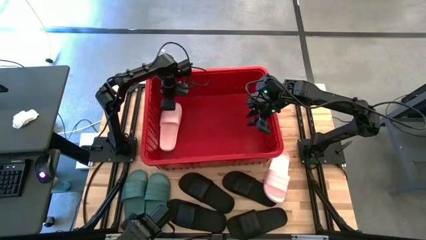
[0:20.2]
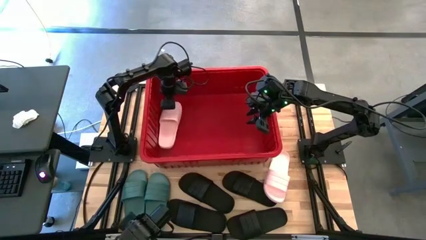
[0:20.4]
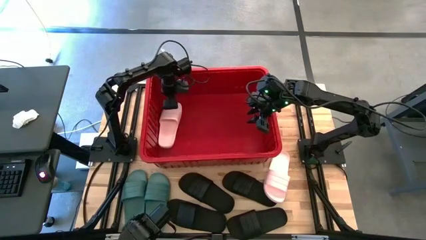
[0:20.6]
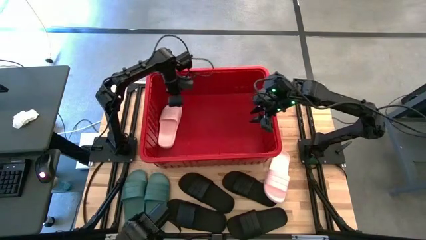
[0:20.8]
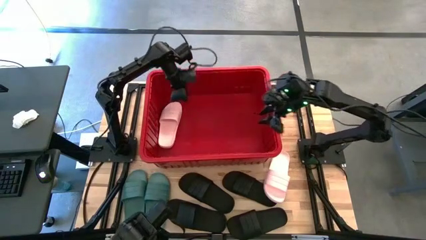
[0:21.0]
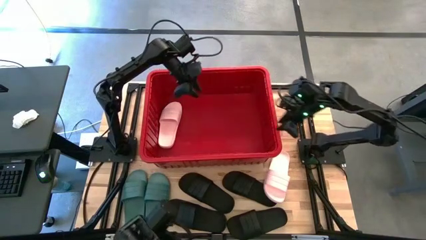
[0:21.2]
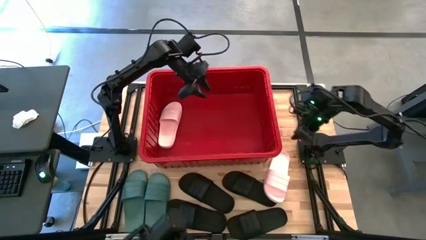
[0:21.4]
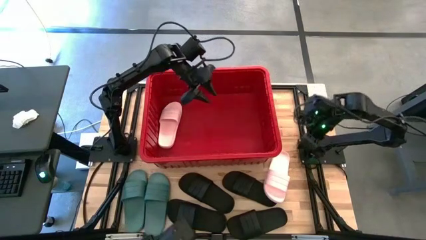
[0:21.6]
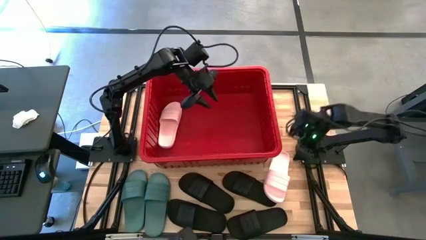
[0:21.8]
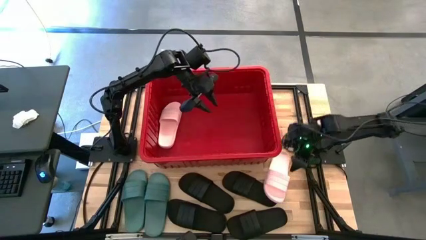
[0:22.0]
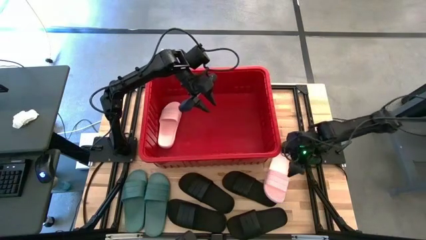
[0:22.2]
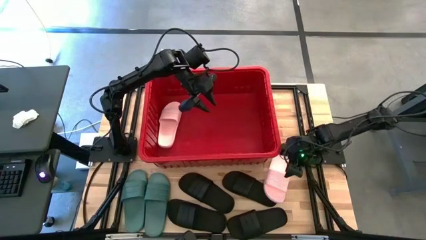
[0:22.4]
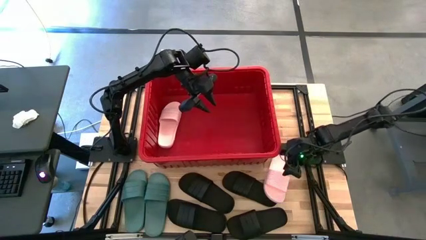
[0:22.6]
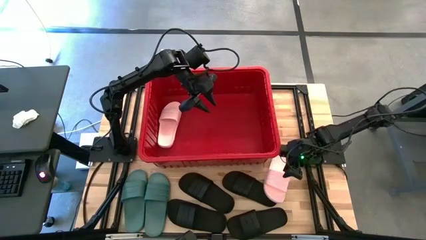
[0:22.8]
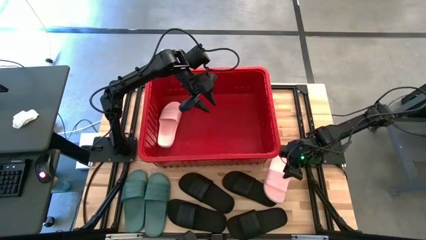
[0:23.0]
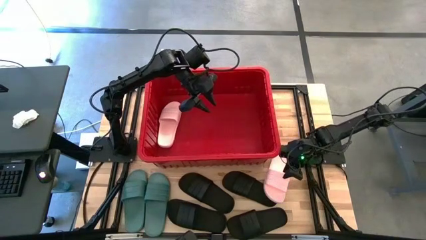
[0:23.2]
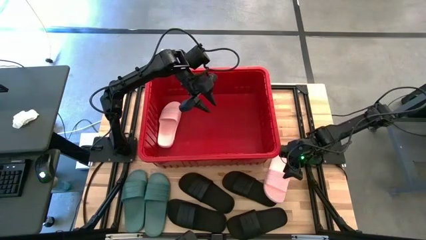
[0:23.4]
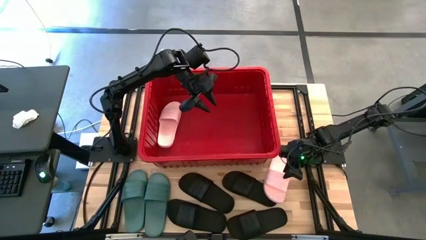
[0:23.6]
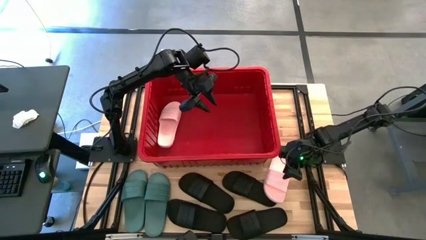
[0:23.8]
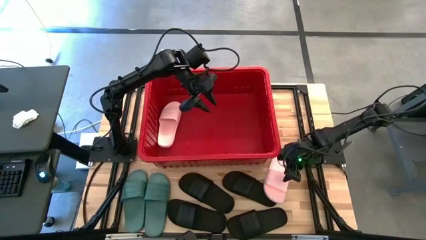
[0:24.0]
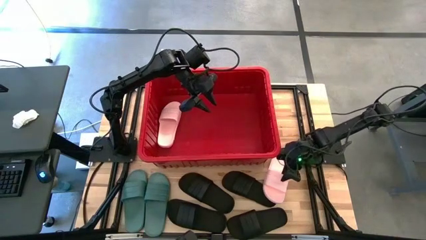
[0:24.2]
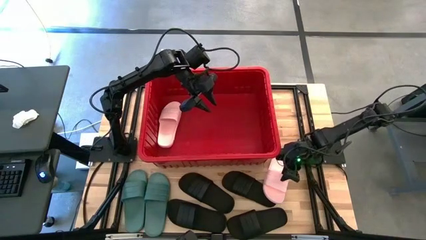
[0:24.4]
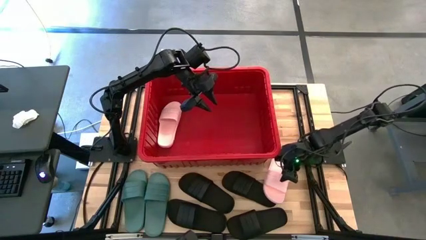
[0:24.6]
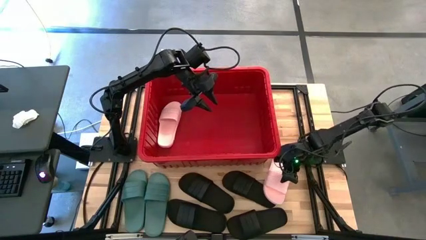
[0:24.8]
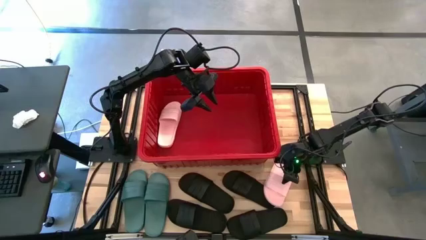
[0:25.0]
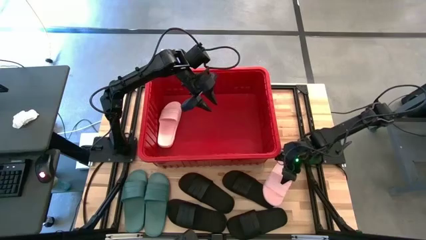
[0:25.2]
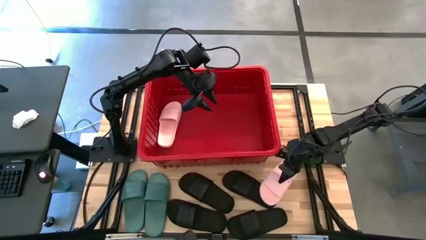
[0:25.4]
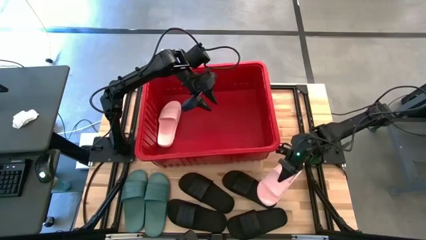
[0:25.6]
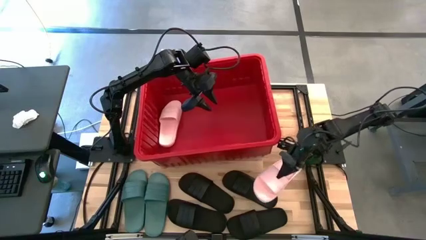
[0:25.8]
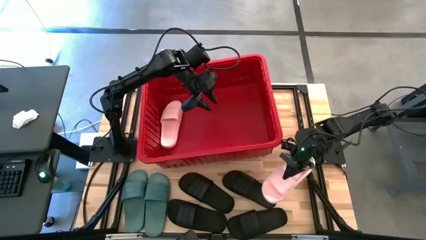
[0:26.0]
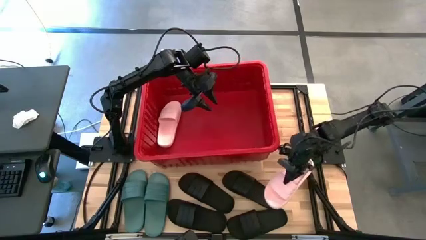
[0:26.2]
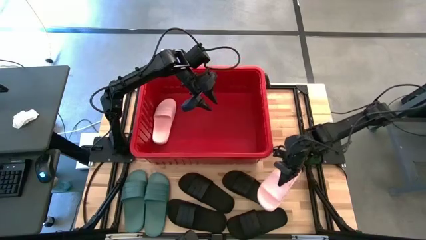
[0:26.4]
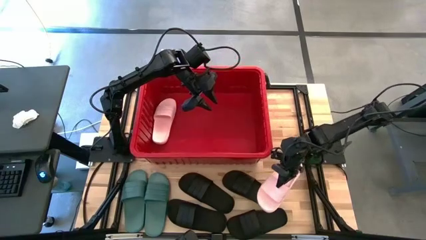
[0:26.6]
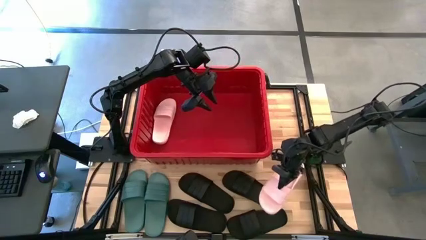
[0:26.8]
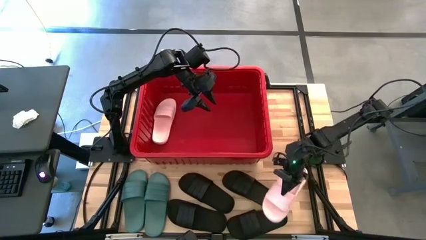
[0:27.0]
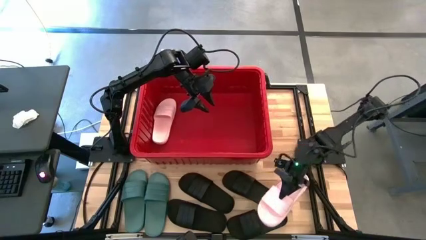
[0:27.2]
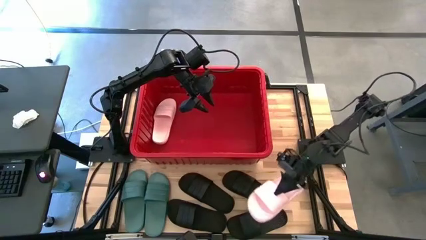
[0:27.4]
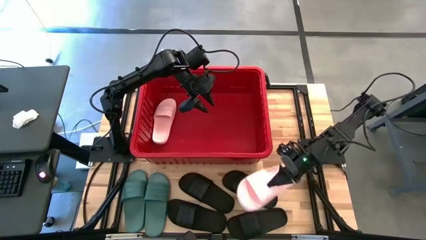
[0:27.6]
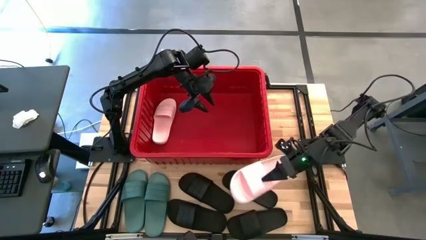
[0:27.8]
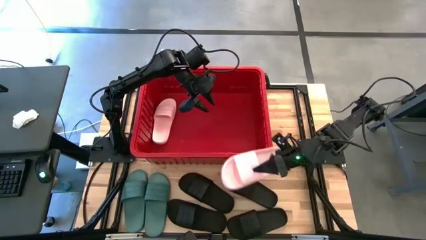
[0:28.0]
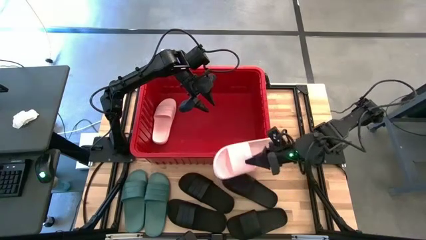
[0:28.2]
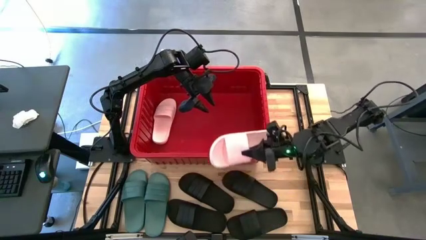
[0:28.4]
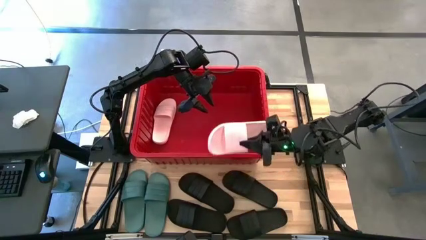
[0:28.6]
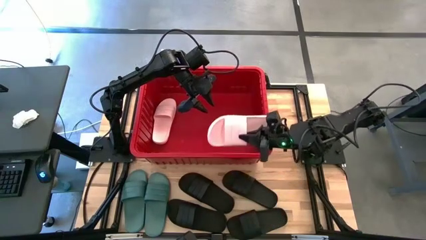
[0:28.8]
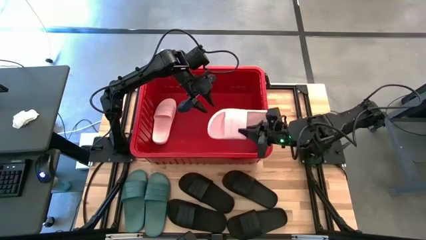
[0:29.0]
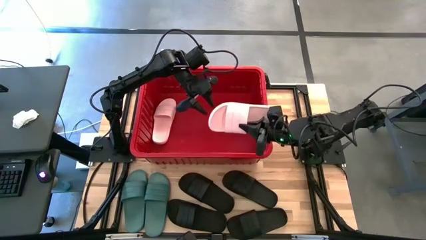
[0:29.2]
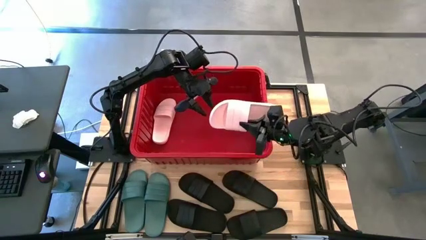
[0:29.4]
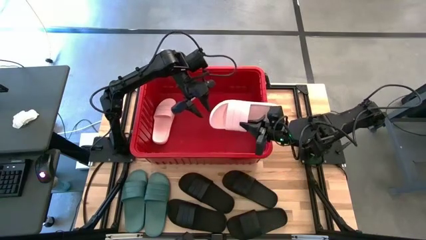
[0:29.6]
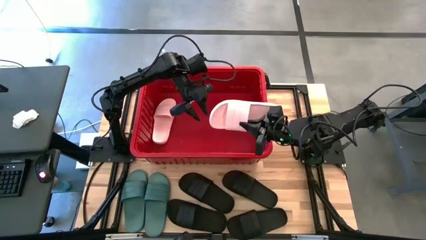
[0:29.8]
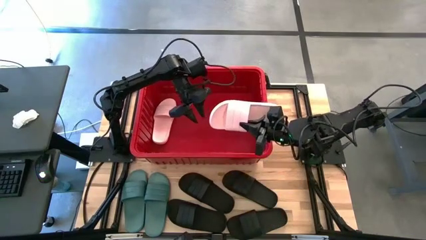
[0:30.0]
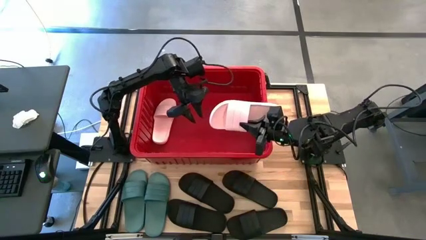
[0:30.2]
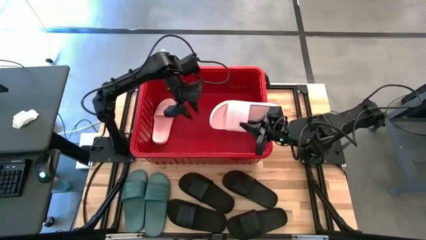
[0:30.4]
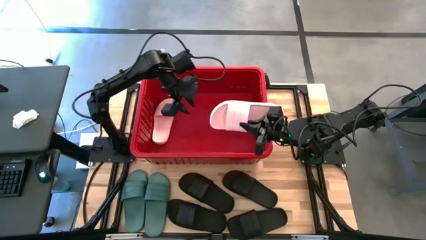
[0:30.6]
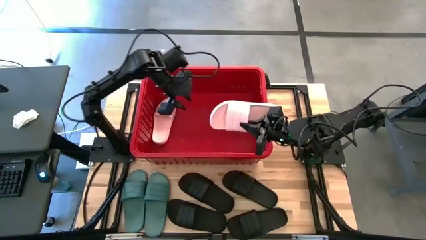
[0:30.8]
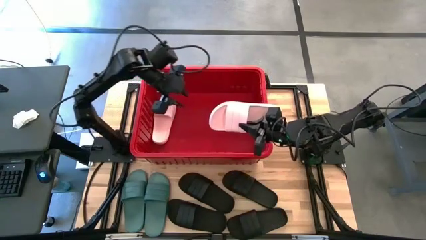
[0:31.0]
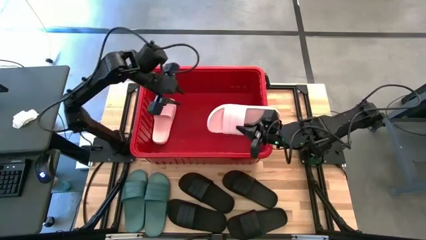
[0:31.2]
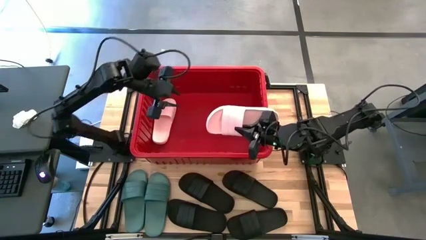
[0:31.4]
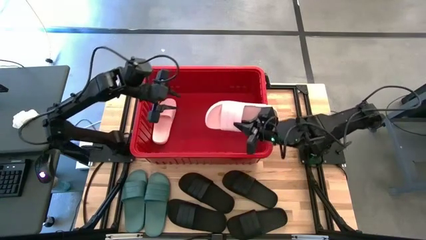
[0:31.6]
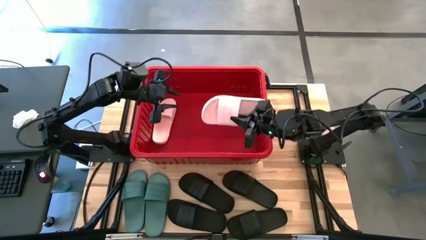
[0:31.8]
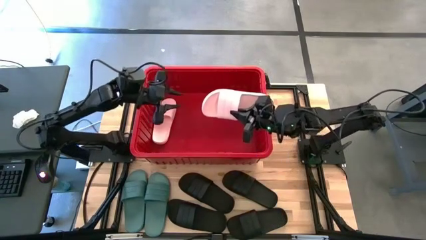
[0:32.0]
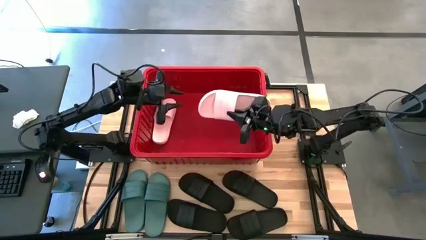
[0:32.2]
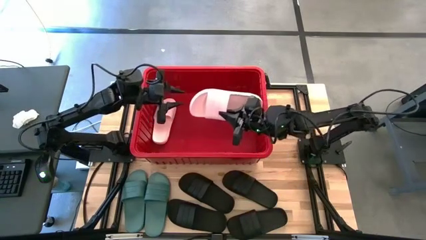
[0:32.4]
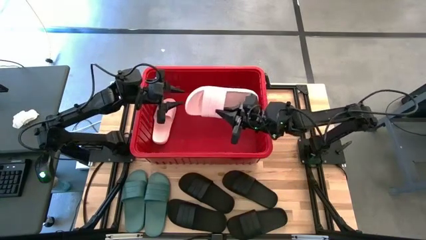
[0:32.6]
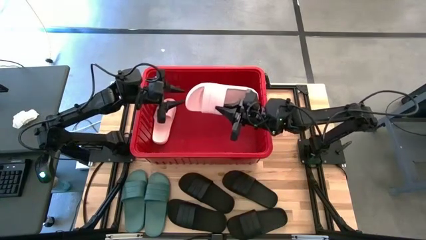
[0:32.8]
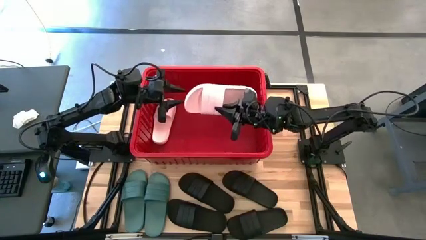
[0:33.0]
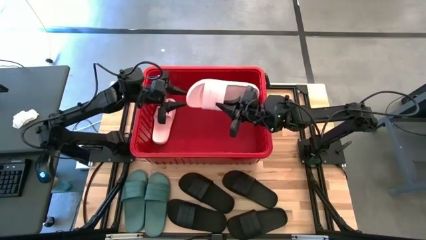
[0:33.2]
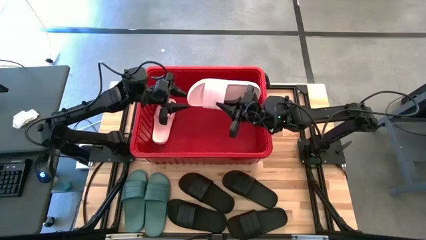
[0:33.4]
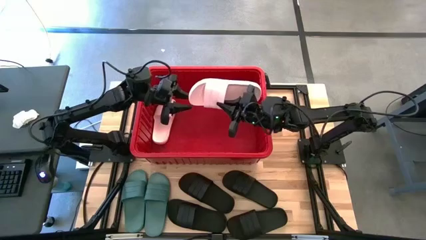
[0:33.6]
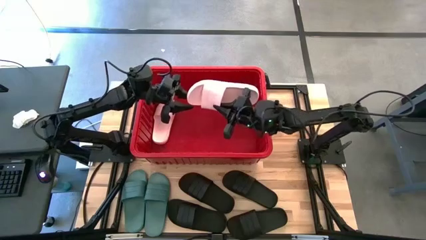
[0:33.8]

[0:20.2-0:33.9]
Task: Pick and place slides into bin
Put the pink slide into the red bin

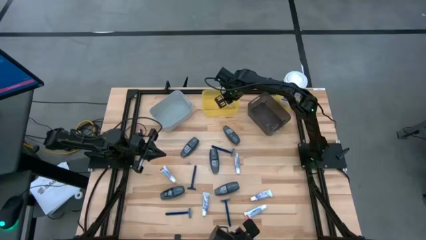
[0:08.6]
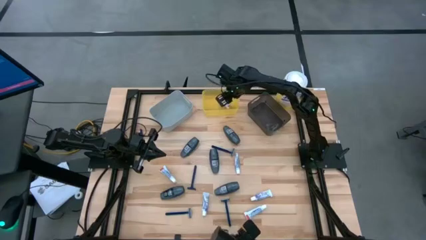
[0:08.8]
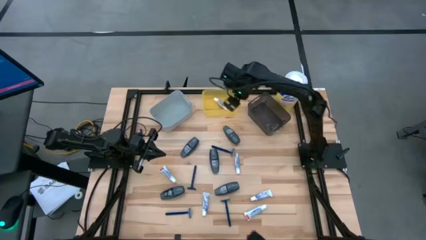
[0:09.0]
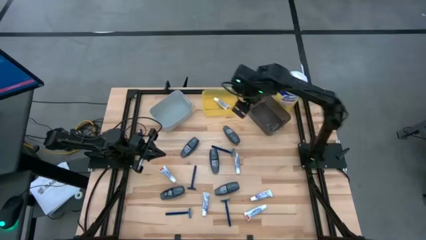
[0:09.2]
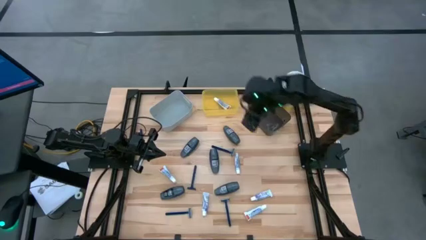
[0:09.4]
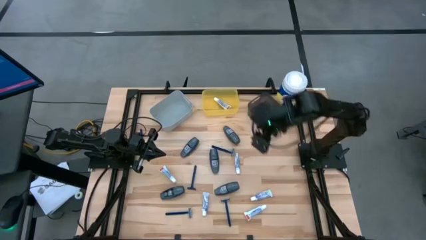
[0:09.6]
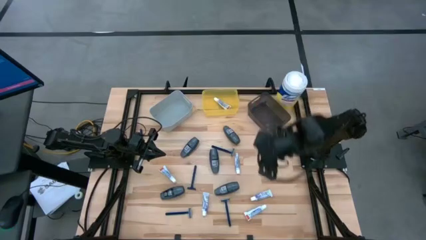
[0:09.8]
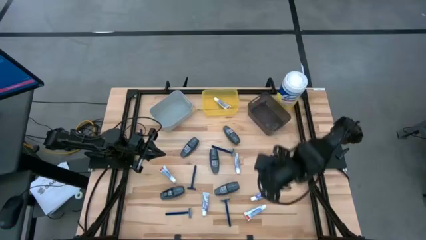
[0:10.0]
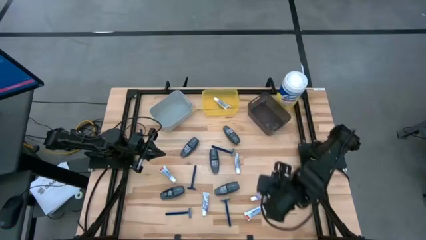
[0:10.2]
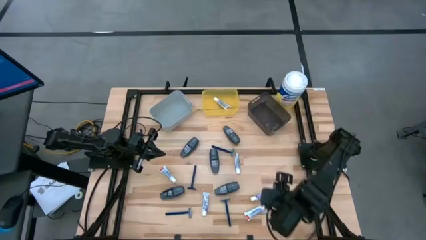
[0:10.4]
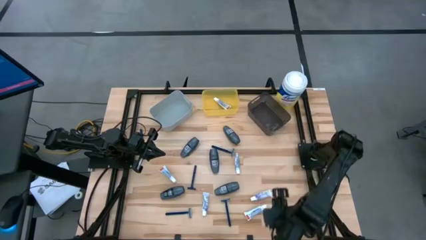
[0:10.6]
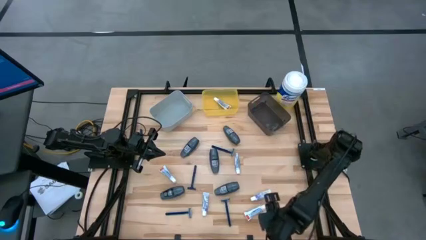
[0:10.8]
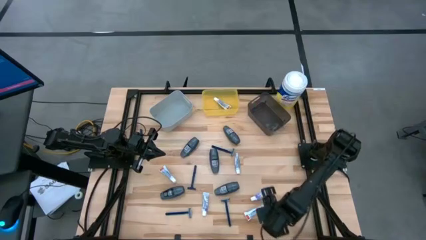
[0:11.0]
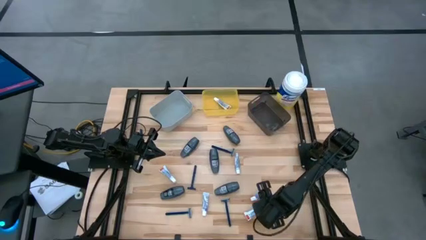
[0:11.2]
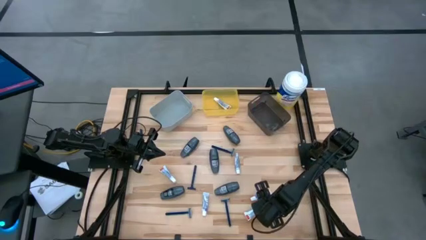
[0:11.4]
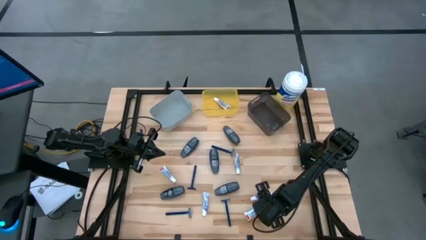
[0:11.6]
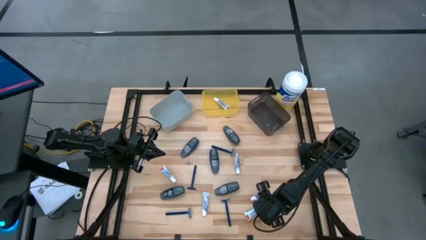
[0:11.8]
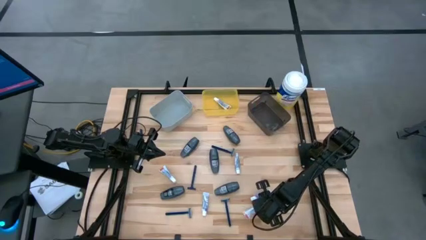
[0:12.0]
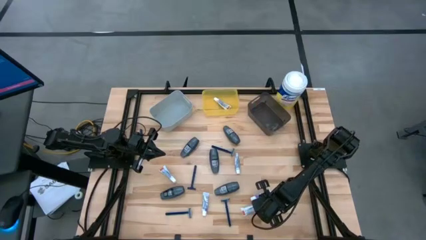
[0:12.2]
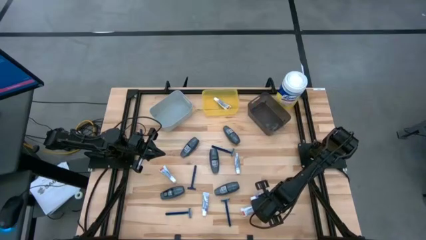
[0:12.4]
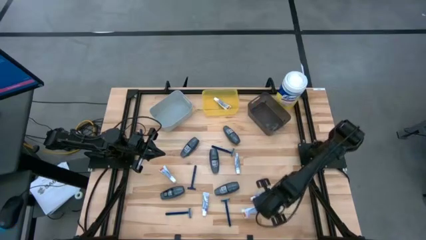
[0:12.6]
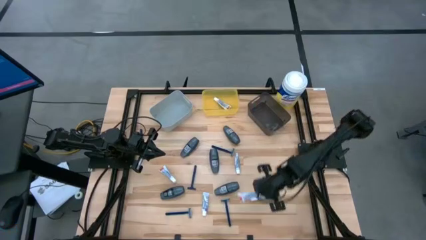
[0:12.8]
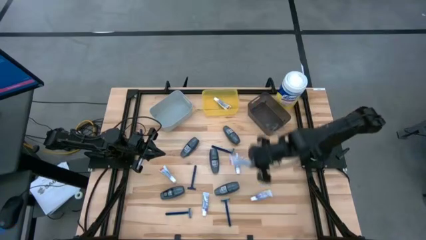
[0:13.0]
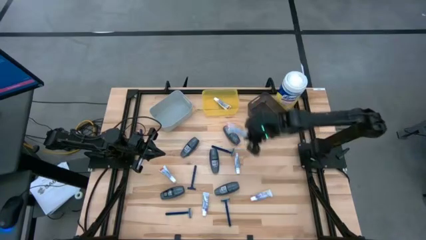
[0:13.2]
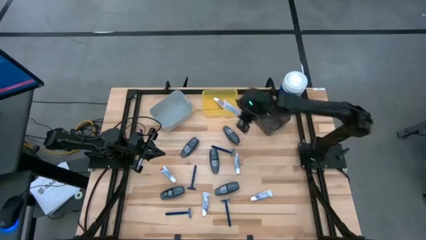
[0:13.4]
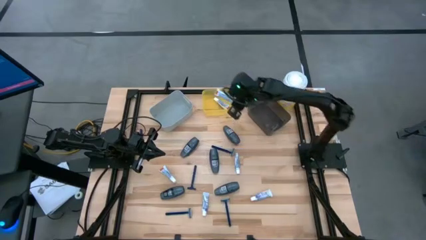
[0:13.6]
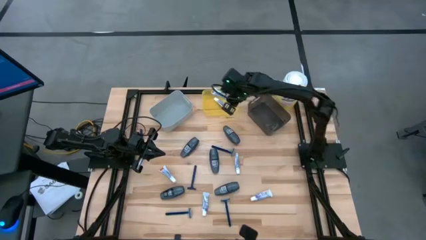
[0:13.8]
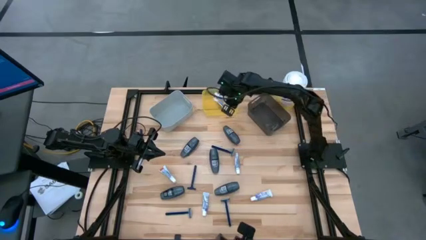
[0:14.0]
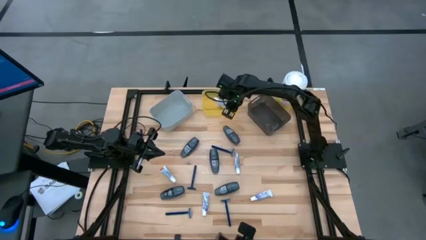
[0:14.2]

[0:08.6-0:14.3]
Task: Pick & Place Travel size toiletries
Put the white toothpaste into the yellow bin
